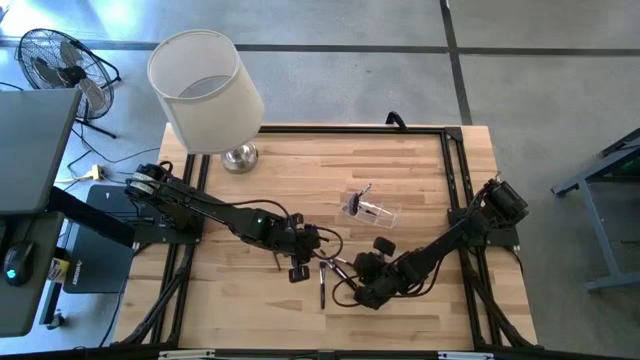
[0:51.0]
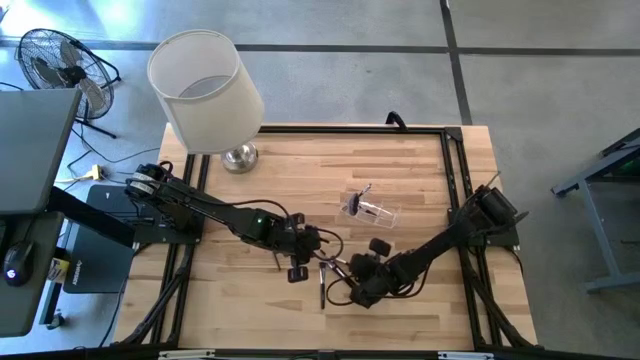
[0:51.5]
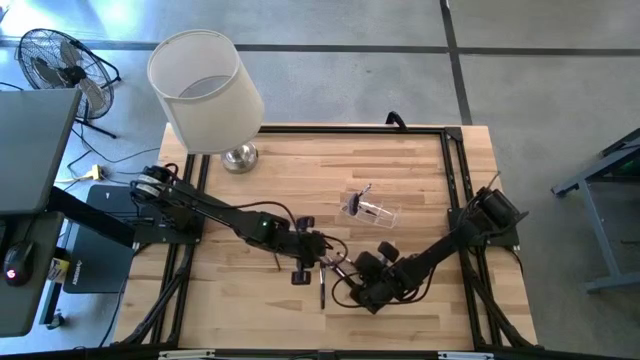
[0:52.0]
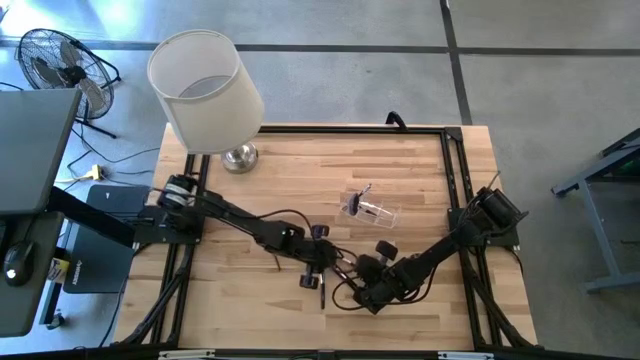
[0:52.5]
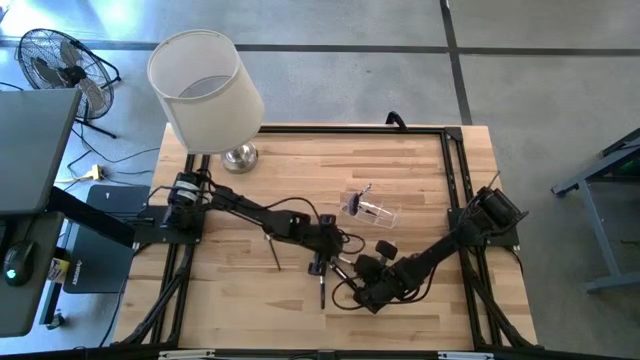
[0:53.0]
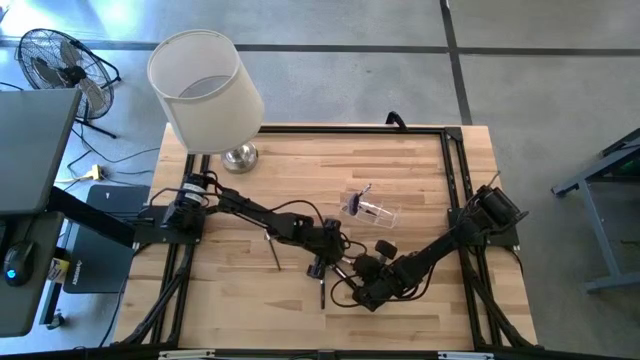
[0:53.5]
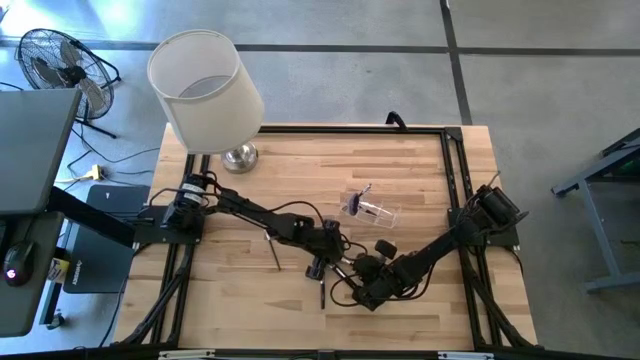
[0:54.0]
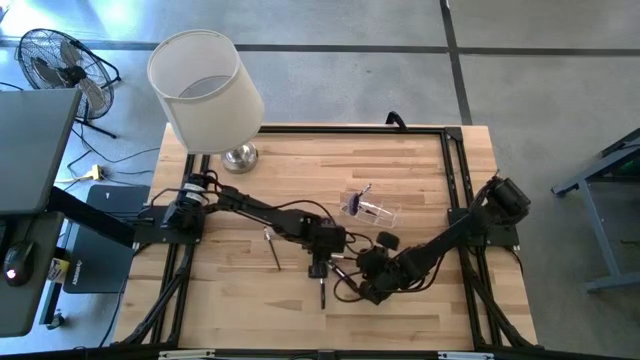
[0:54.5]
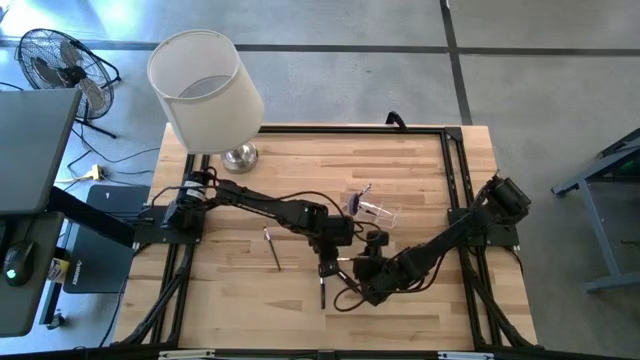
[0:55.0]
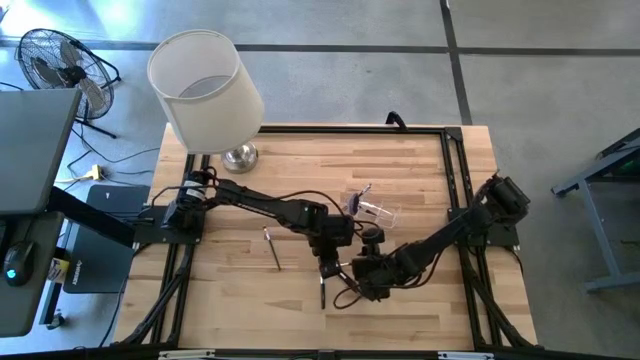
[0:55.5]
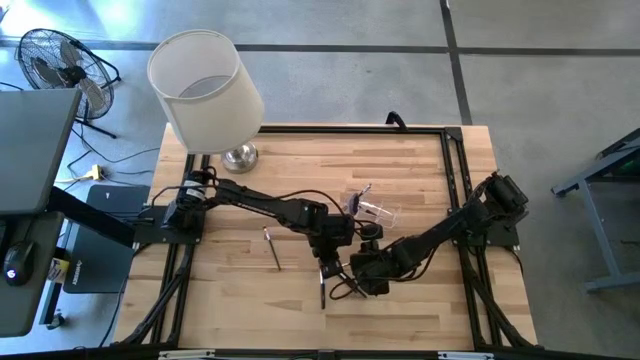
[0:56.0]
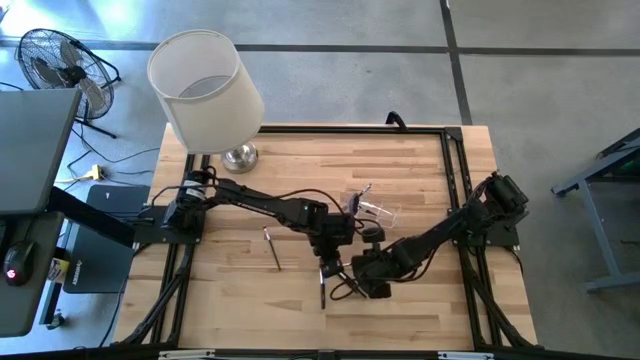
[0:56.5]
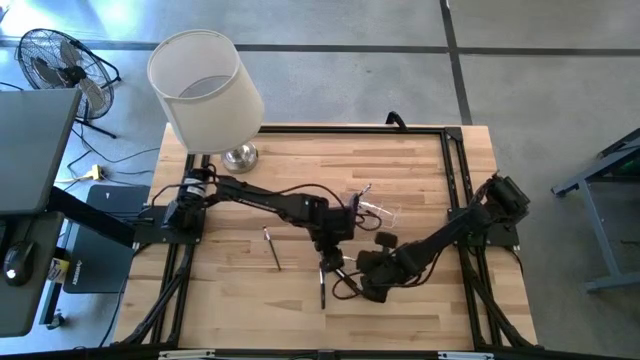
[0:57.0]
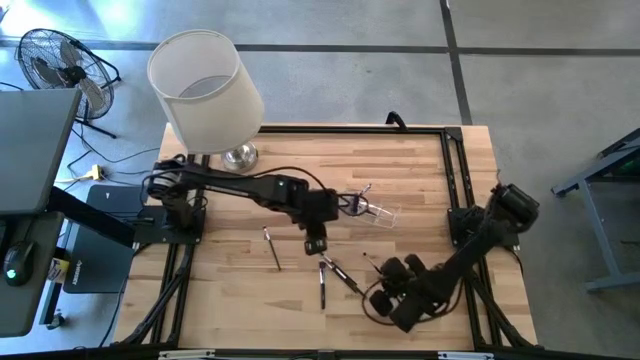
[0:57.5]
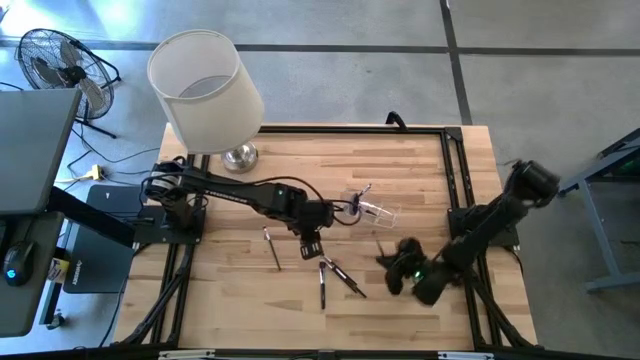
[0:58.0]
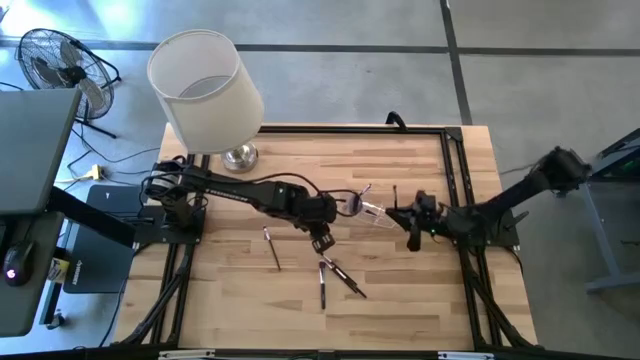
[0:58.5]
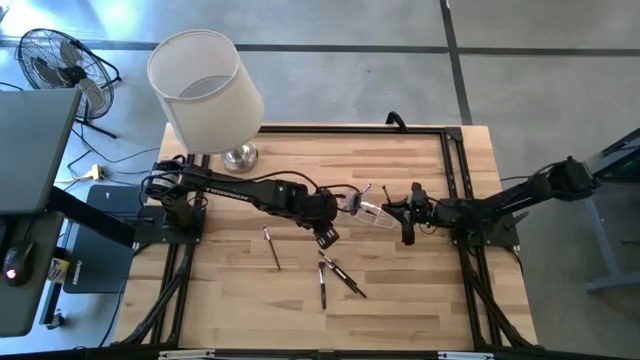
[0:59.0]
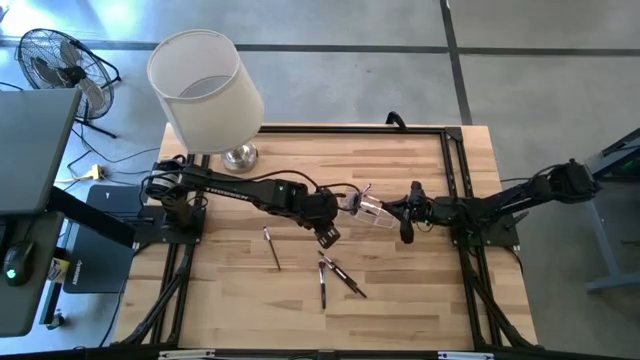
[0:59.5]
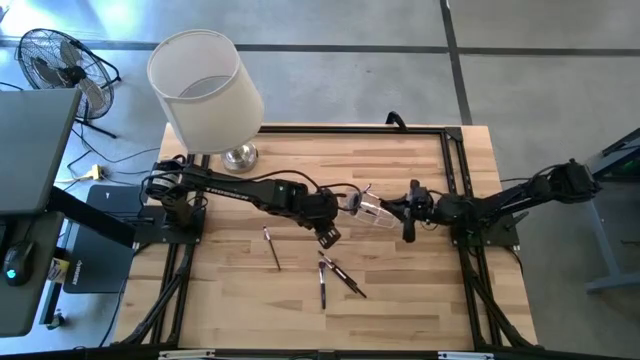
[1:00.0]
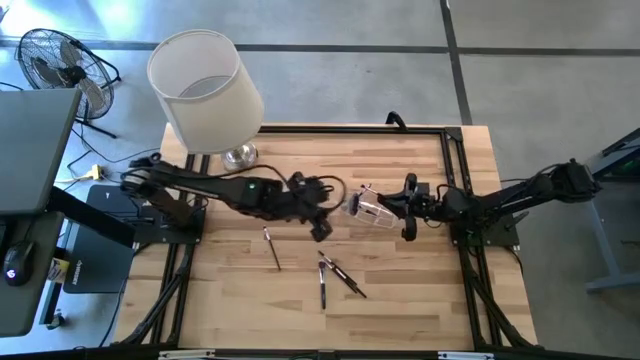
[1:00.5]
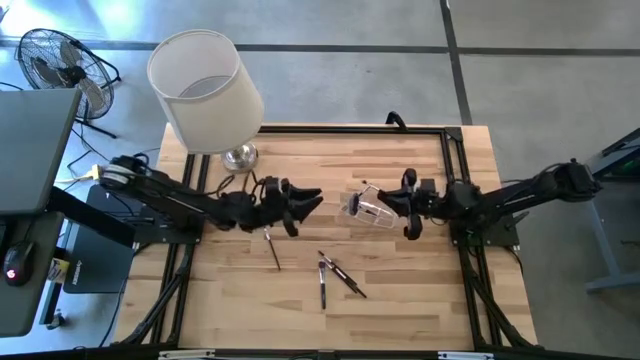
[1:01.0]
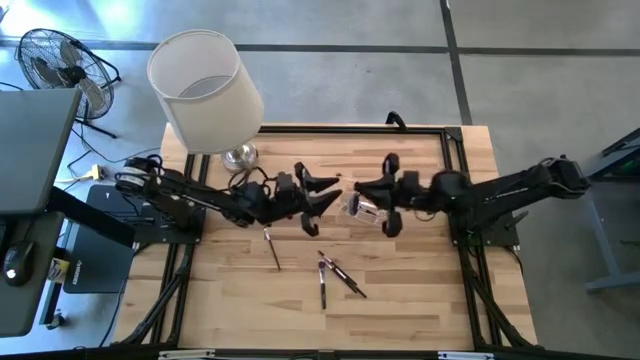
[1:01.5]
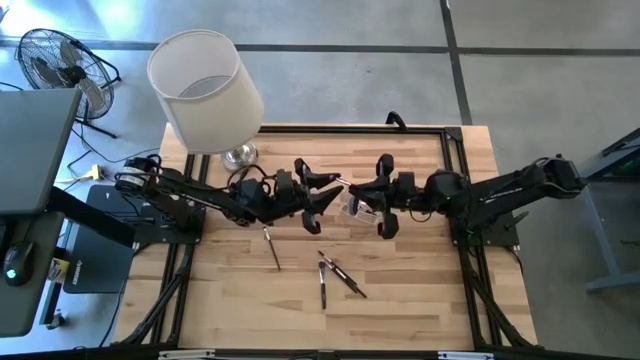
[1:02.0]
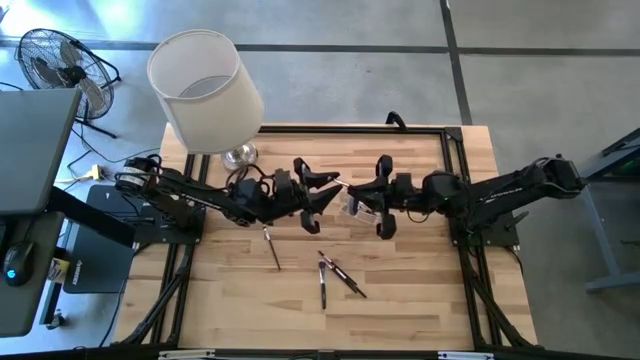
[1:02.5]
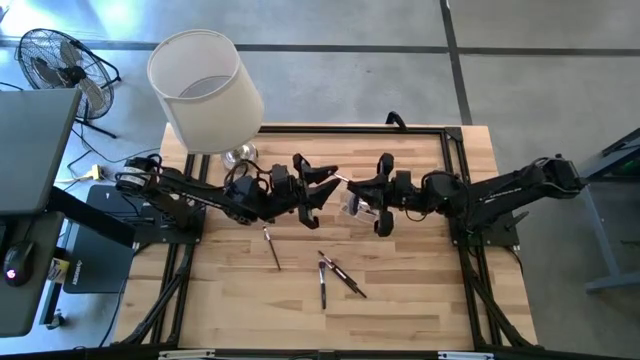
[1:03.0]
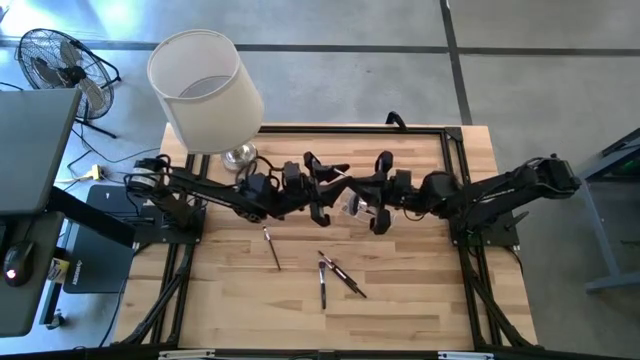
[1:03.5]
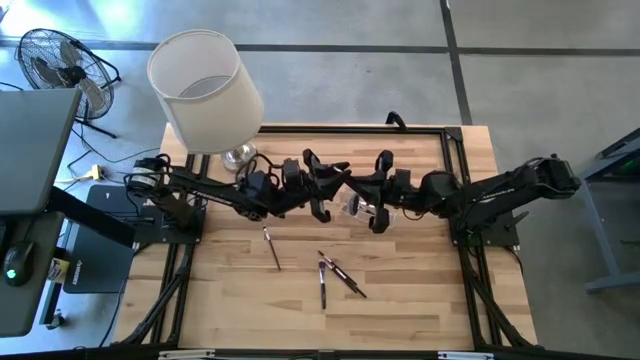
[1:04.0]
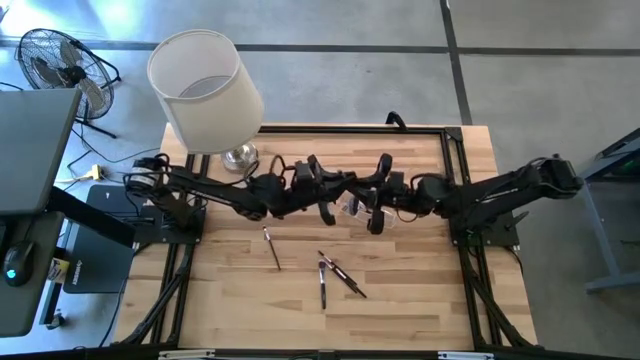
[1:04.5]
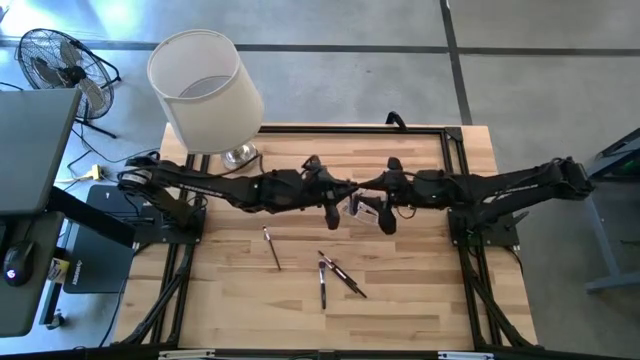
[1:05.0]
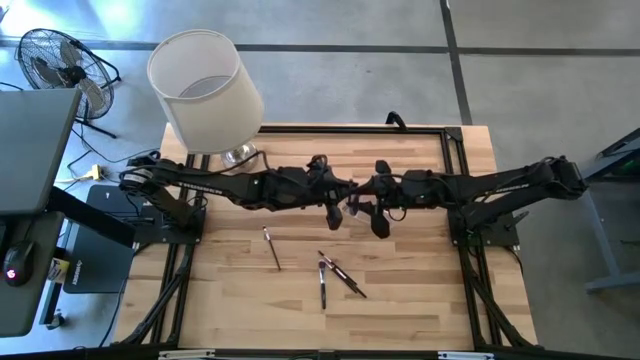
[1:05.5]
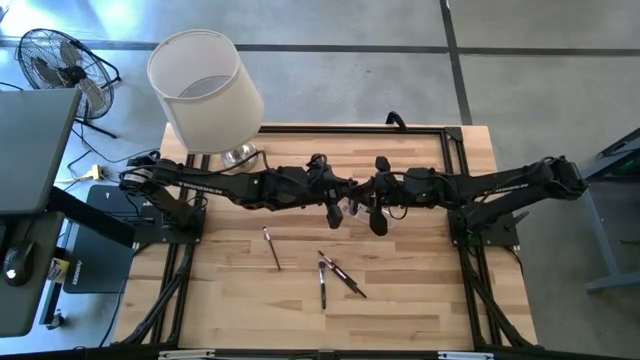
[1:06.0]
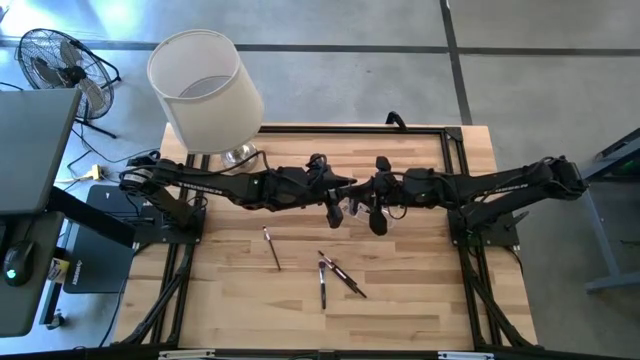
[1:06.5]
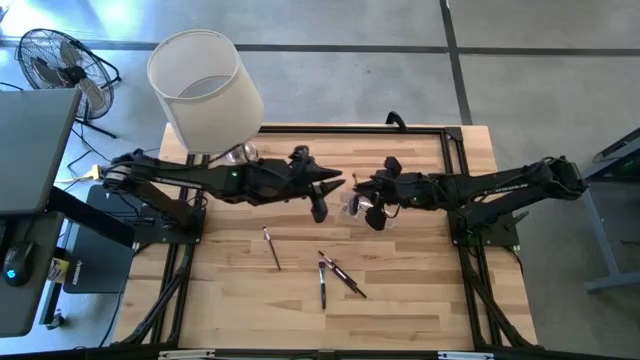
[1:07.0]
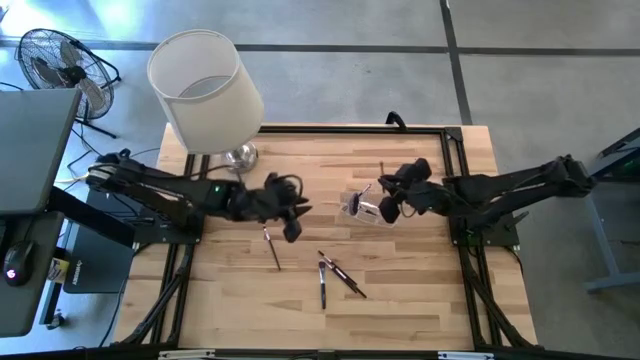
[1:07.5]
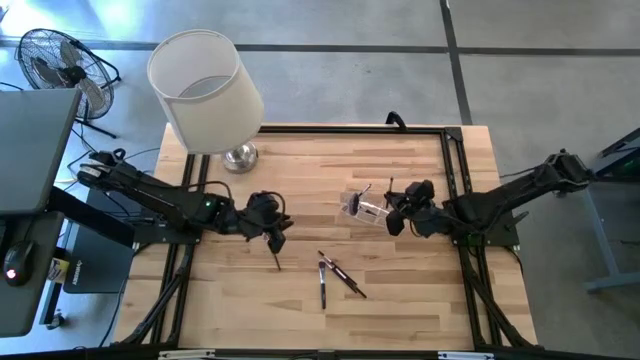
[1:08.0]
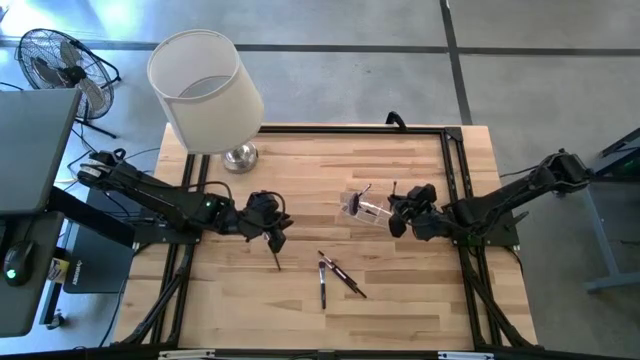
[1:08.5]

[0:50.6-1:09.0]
Task: Put items in baskets/containers
Put the black eyeshadow brush into the transparent organizer
